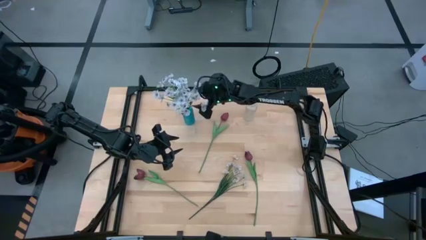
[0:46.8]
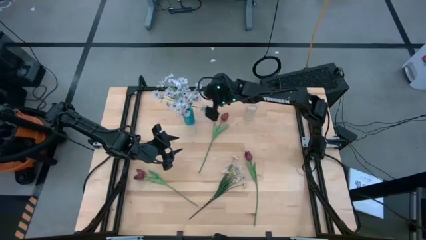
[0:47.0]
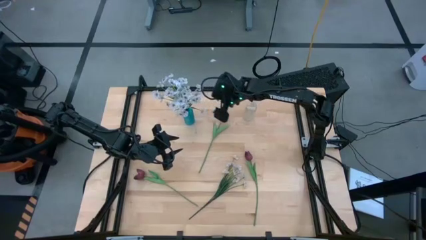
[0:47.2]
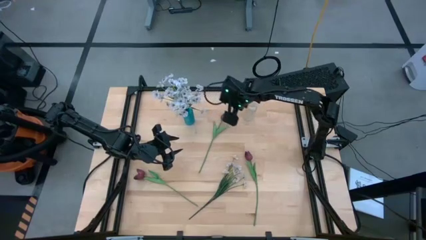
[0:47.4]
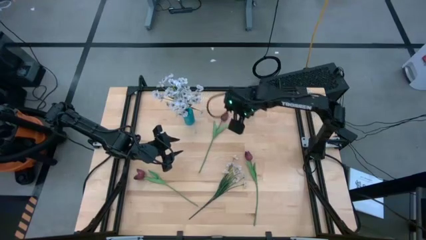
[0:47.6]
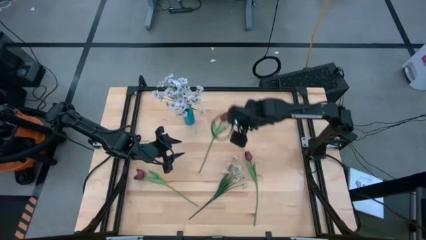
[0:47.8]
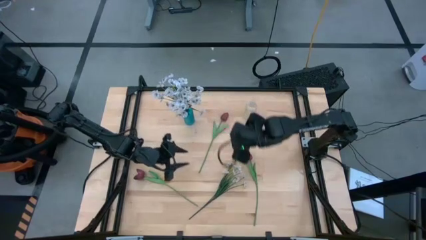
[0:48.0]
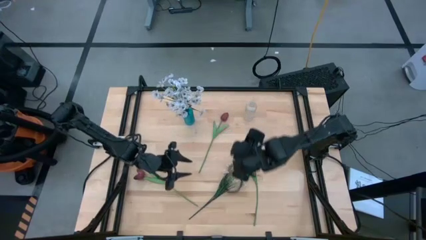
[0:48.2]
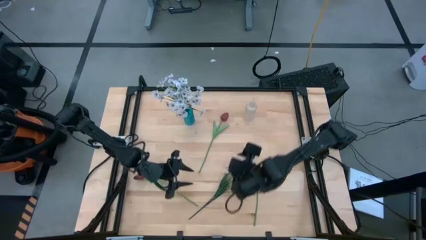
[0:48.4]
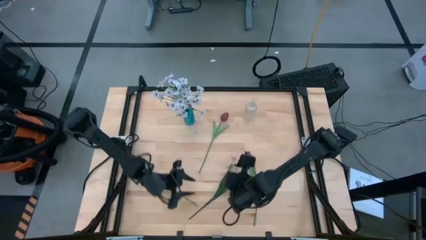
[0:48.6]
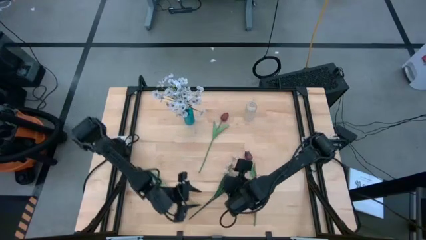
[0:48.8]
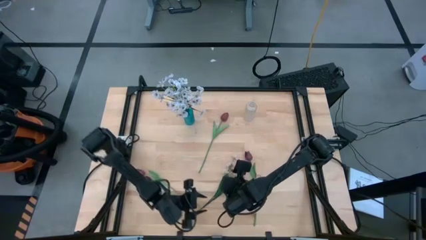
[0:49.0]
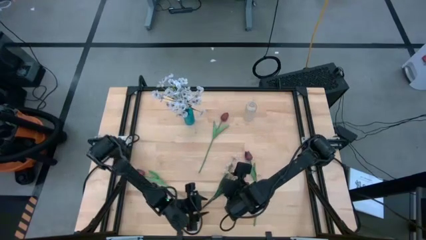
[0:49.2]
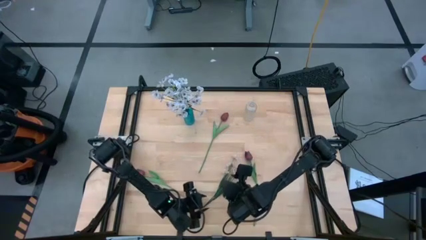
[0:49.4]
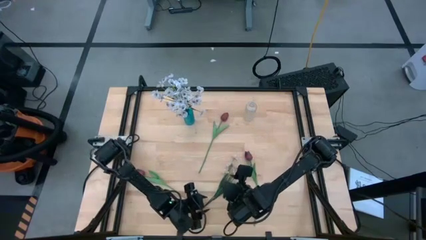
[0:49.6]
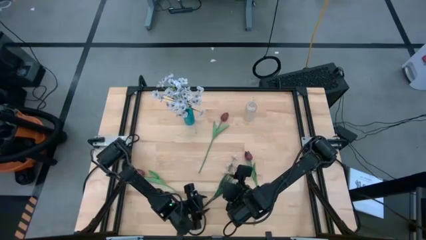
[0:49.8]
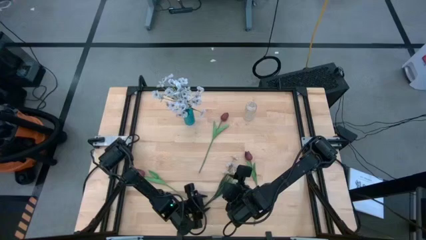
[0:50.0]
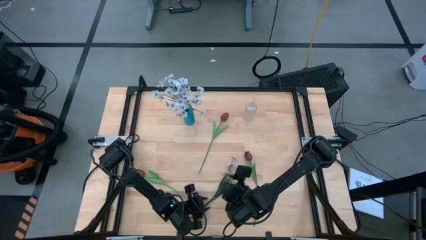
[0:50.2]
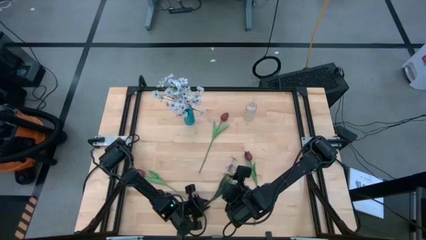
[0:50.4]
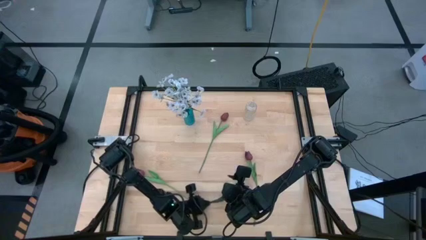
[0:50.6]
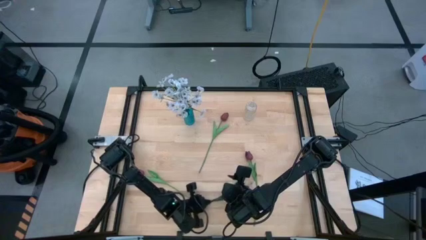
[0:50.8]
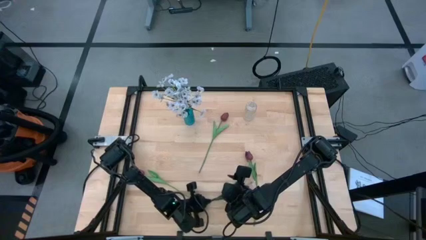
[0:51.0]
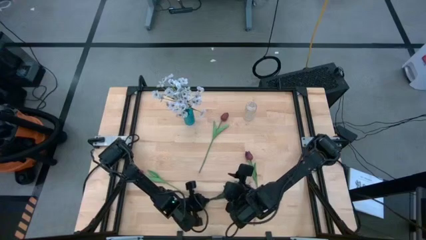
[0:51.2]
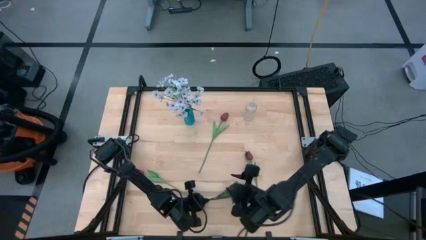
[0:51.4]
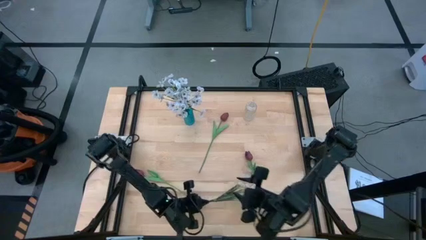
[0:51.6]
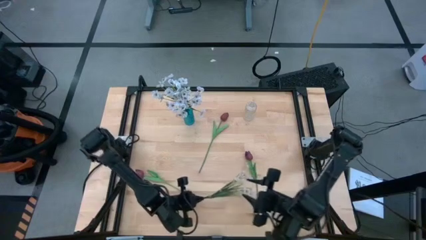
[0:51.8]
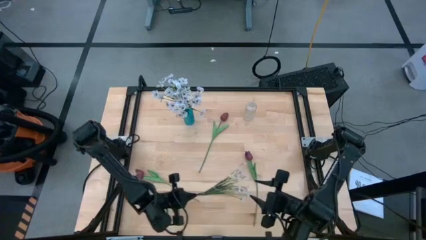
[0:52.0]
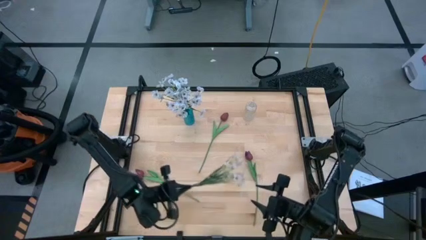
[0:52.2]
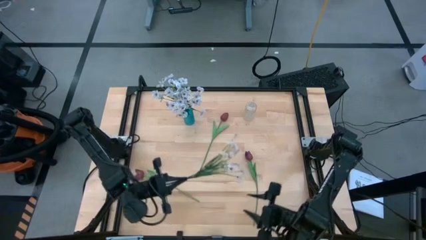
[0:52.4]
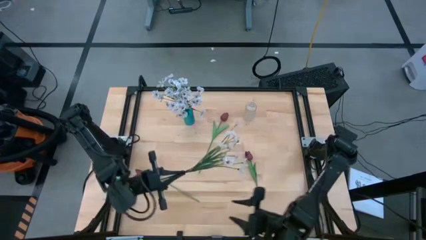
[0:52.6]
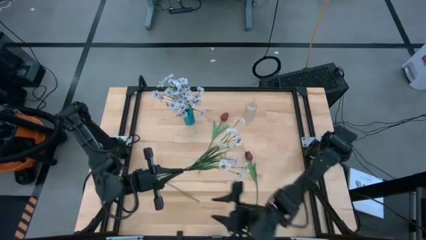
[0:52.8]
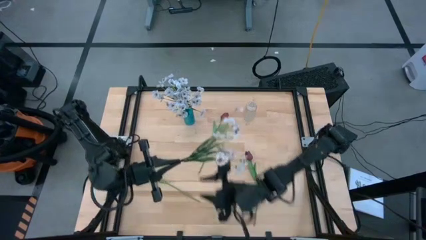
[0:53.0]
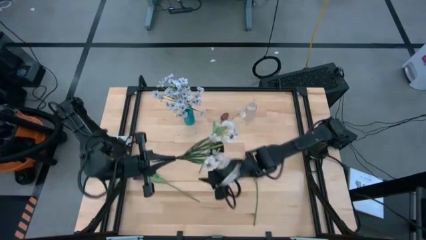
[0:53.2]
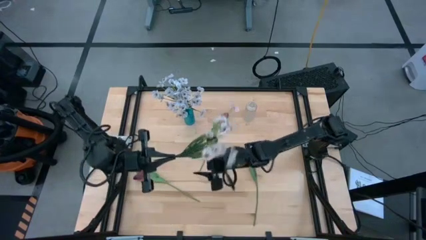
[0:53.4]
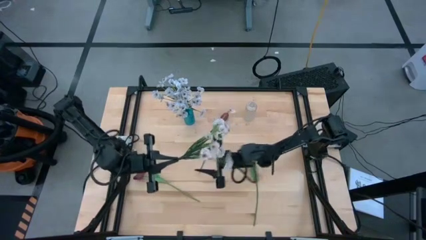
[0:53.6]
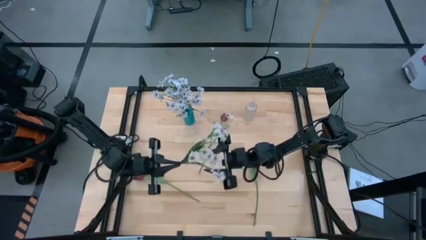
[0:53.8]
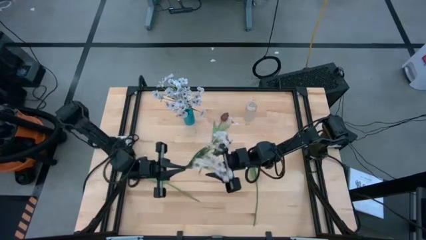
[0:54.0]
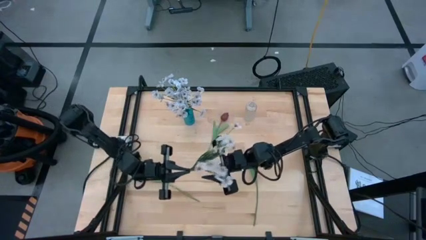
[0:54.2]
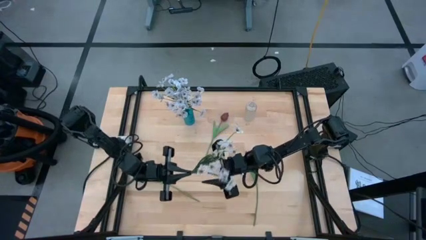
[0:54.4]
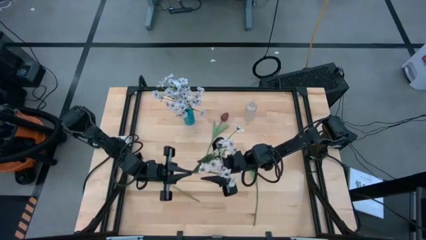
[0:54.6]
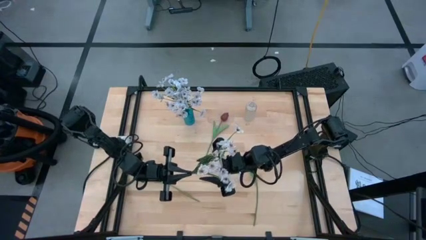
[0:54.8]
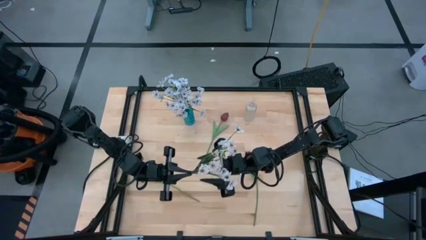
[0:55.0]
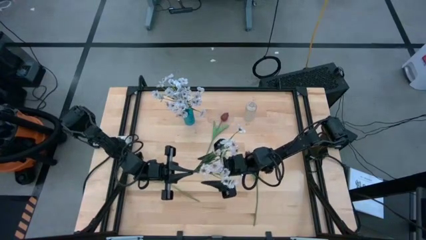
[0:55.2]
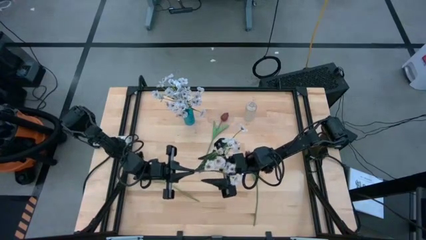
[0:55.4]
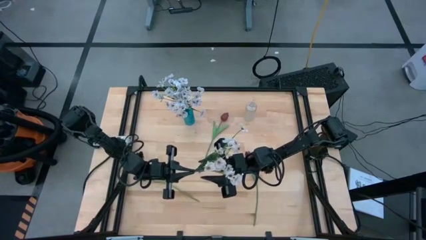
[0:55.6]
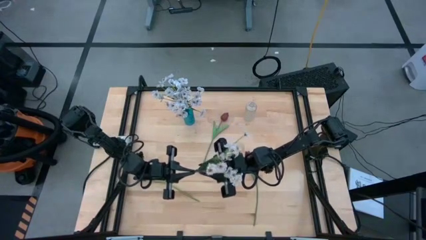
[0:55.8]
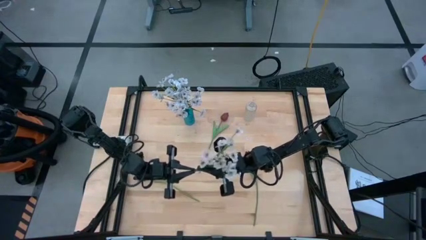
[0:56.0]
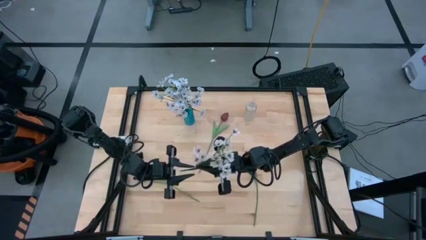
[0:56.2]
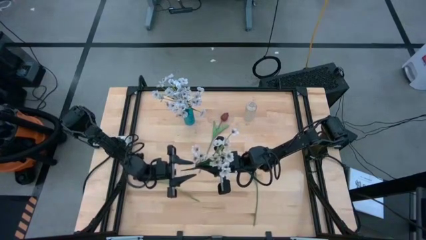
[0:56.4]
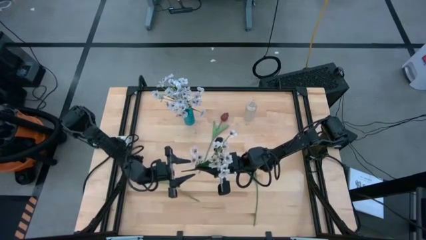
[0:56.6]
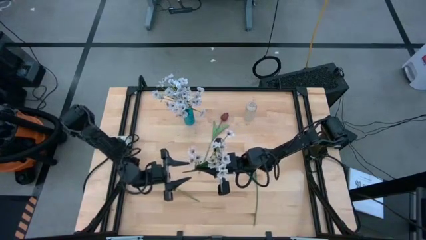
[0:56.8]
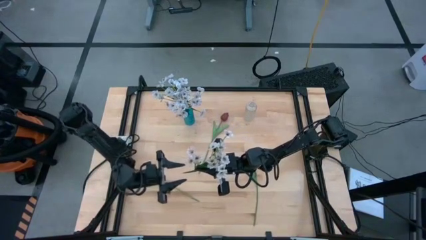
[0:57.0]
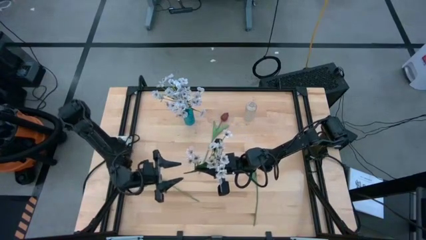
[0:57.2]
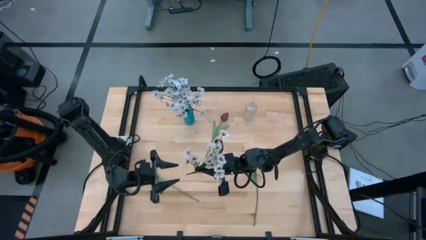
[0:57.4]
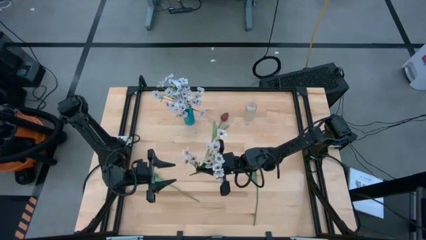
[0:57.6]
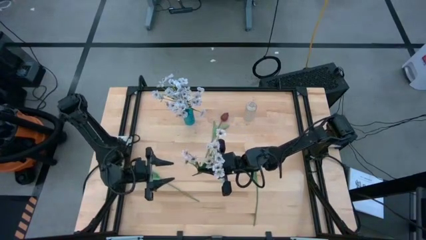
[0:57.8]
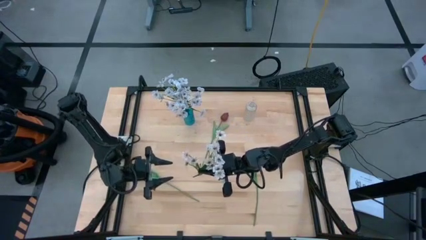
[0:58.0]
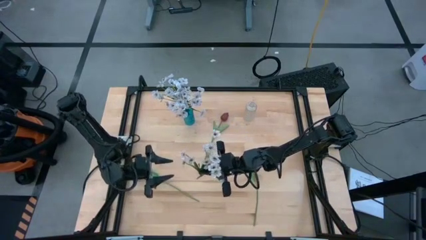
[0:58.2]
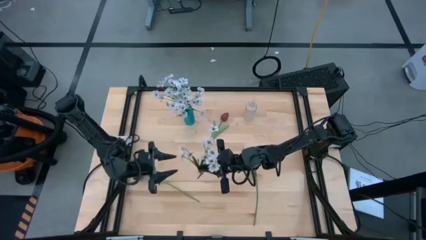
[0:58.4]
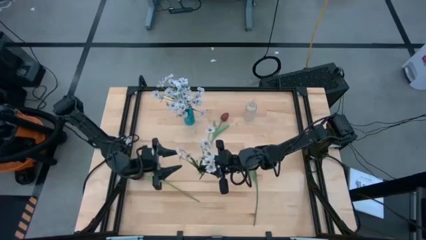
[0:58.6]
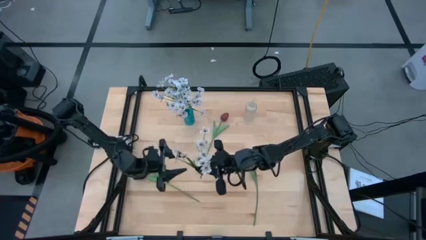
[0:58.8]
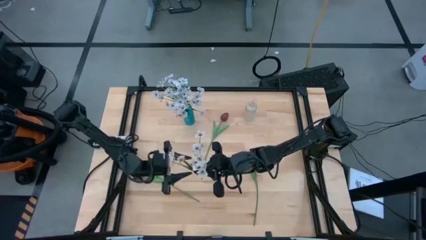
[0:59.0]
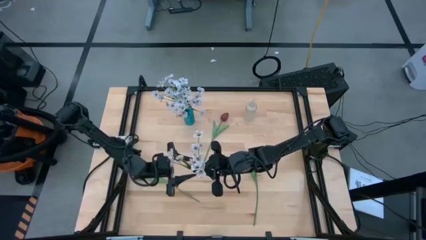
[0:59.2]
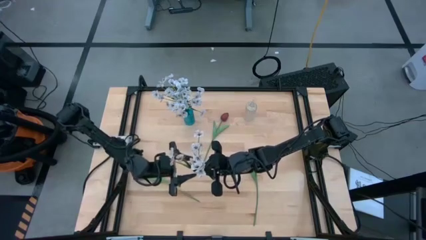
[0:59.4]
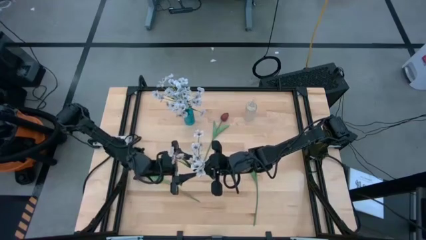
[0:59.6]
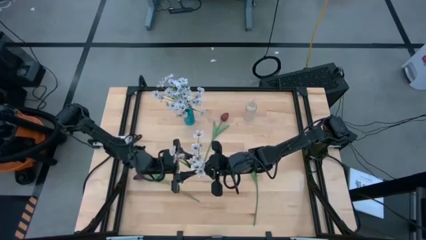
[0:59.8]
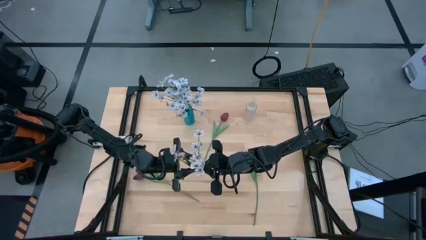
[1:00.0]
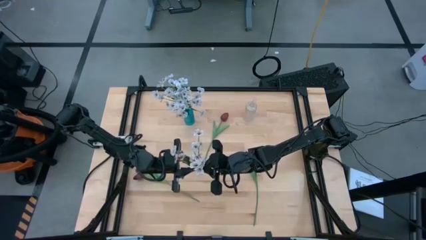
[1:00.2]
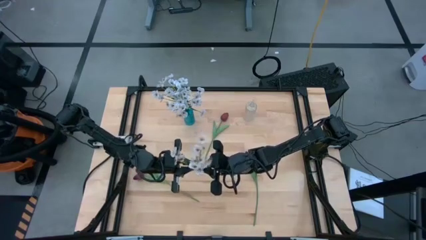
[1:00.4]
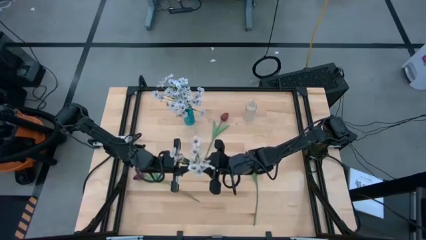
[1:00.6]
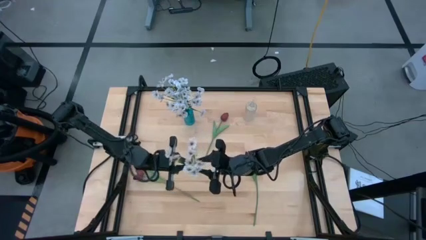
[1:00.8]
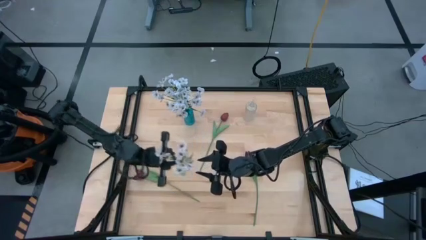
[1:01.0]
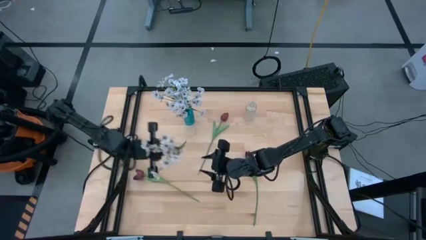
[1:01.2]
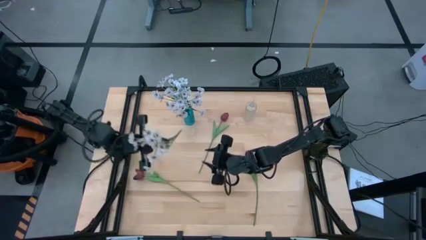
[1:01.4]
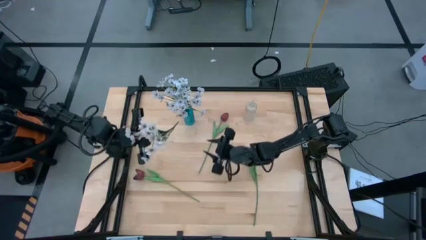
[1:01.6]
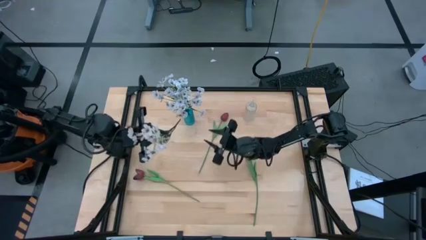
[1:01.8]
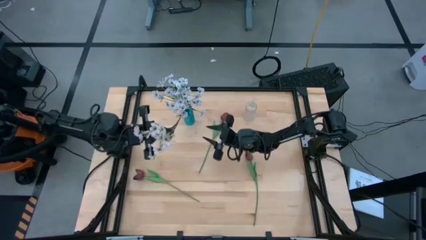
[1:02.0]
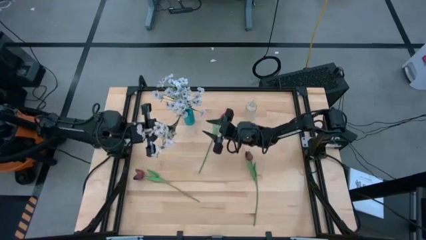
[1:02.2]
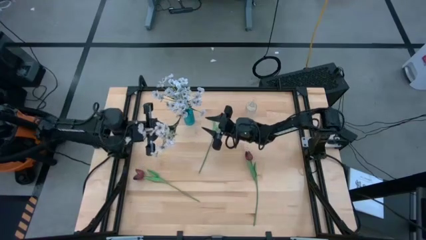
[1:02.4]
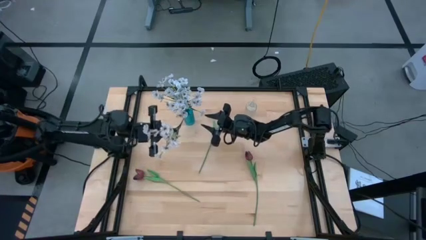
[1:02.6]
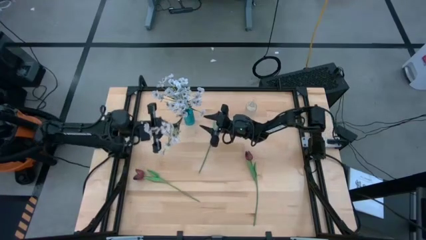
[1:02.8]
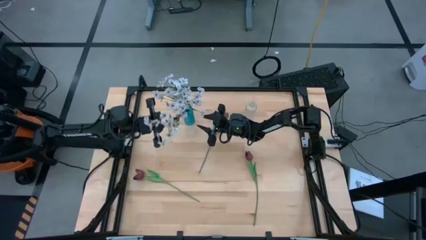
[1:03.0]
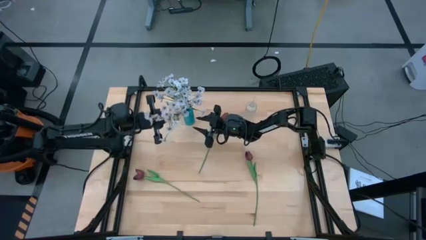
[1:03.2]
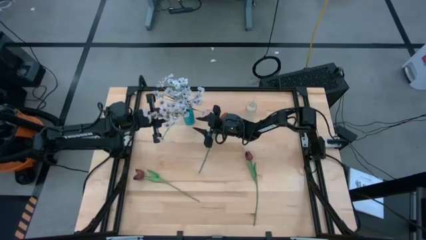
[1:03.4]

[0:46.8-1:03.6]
Task: Sort flowers into vase by color
Put the white flowers into the blue vase
